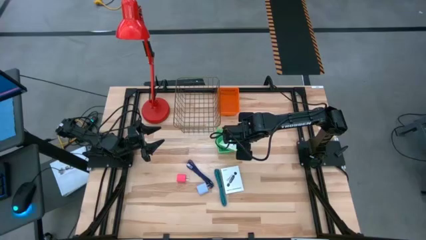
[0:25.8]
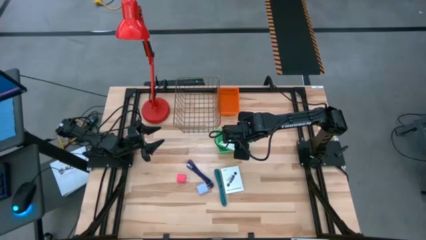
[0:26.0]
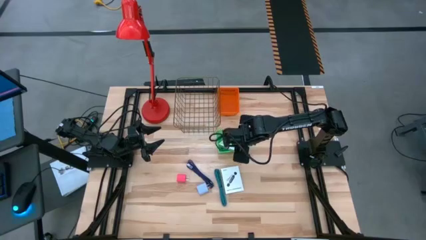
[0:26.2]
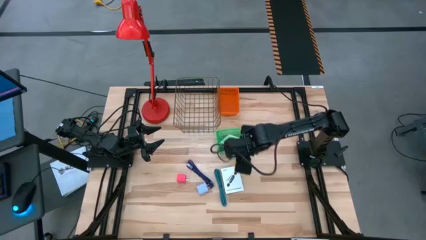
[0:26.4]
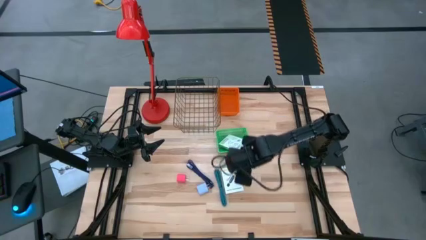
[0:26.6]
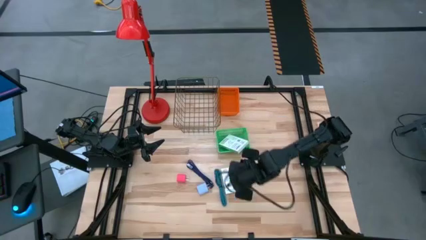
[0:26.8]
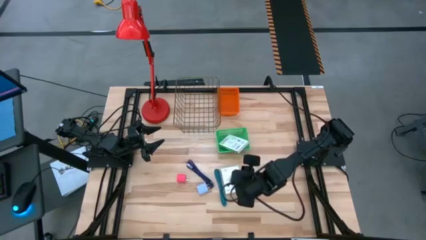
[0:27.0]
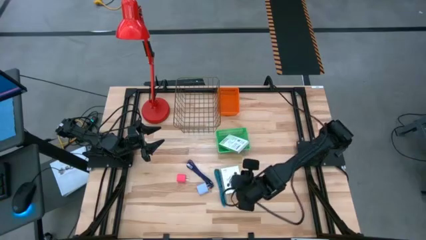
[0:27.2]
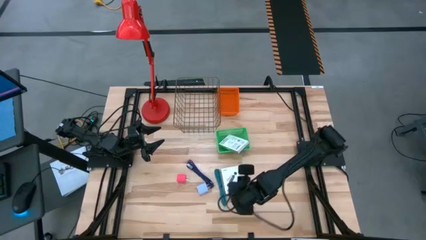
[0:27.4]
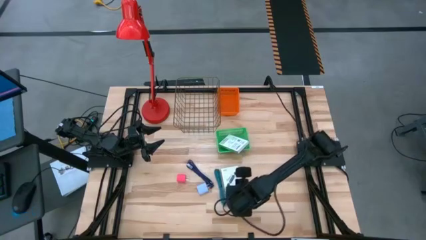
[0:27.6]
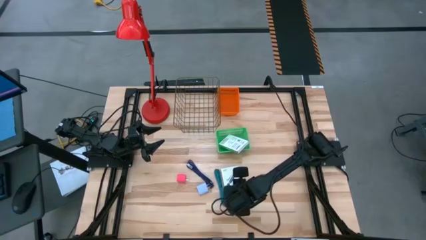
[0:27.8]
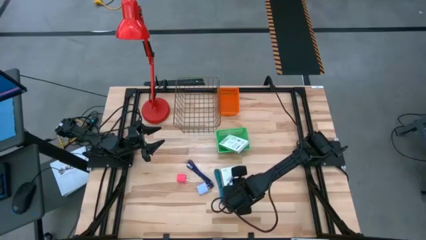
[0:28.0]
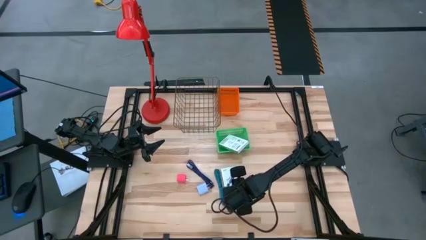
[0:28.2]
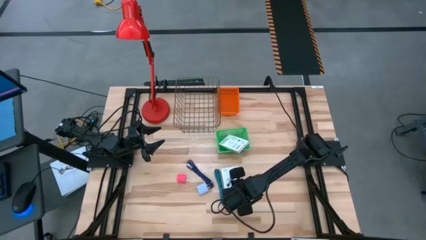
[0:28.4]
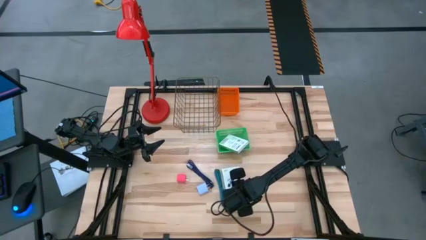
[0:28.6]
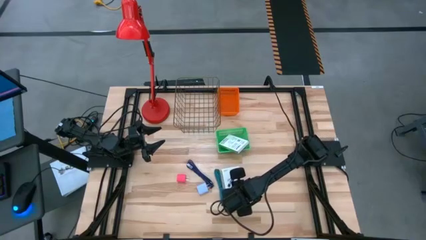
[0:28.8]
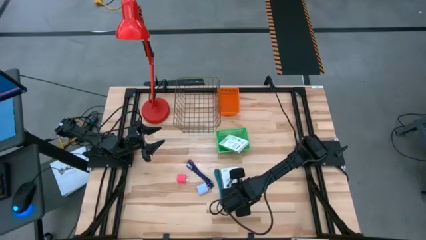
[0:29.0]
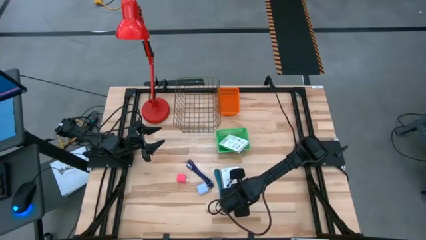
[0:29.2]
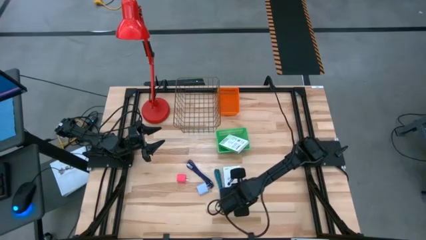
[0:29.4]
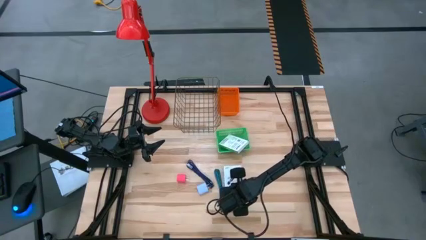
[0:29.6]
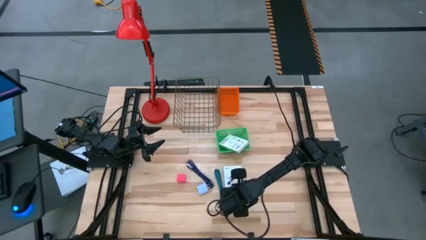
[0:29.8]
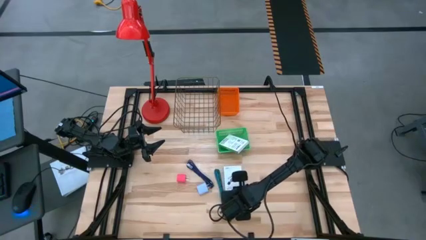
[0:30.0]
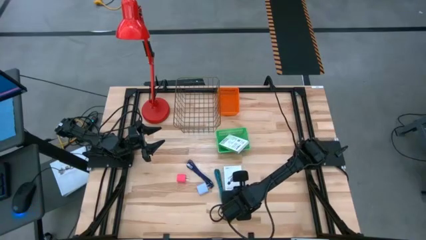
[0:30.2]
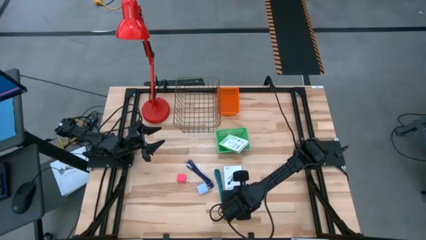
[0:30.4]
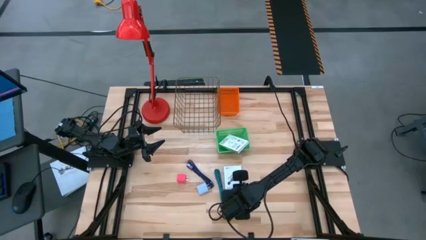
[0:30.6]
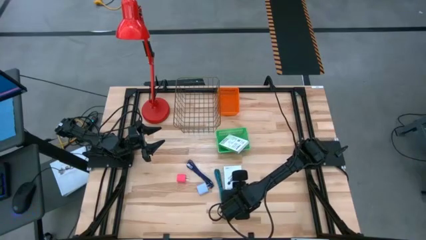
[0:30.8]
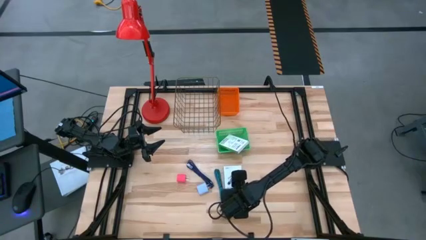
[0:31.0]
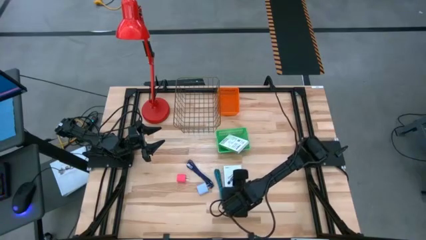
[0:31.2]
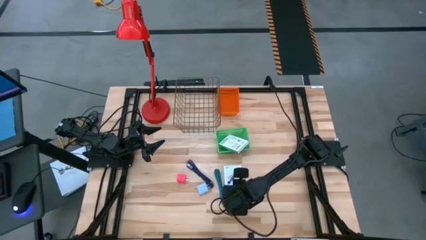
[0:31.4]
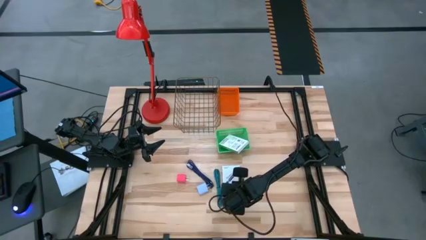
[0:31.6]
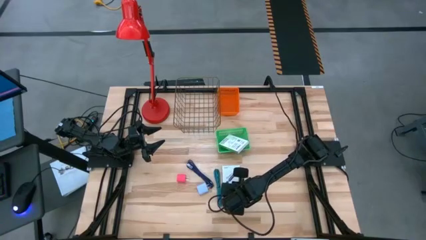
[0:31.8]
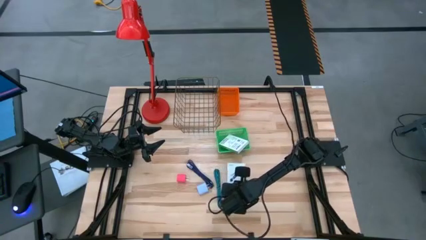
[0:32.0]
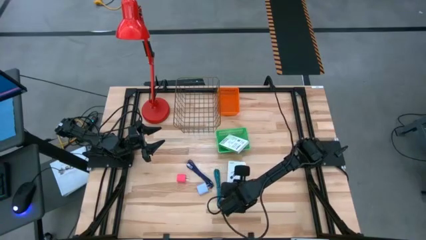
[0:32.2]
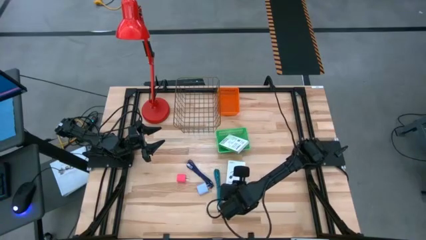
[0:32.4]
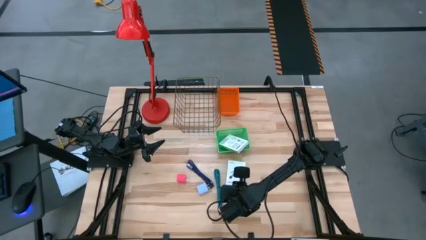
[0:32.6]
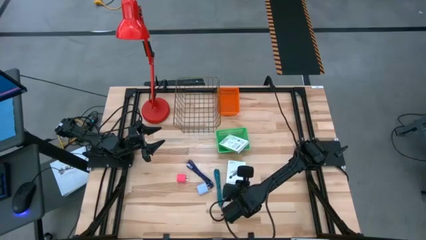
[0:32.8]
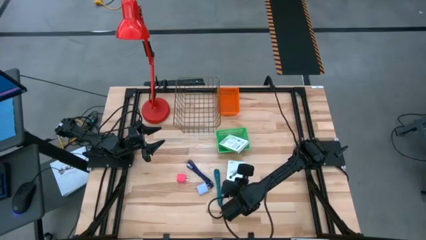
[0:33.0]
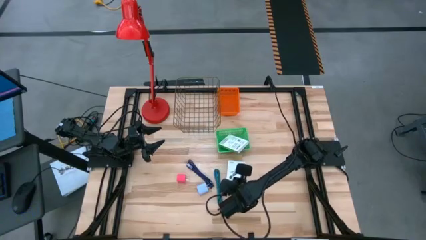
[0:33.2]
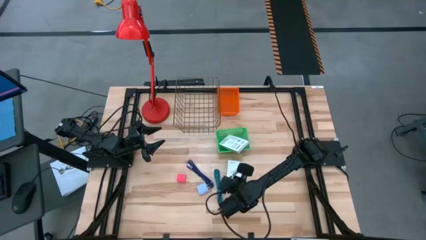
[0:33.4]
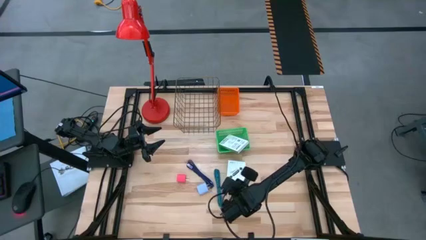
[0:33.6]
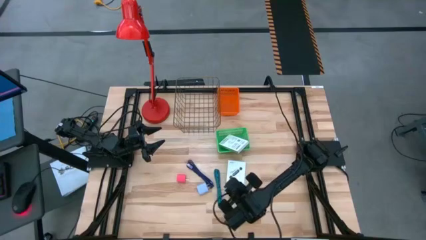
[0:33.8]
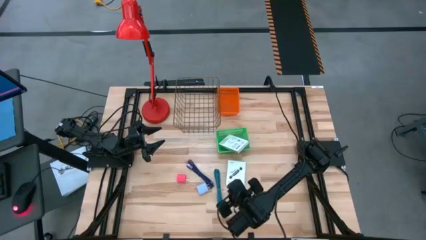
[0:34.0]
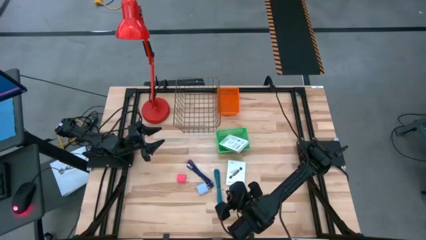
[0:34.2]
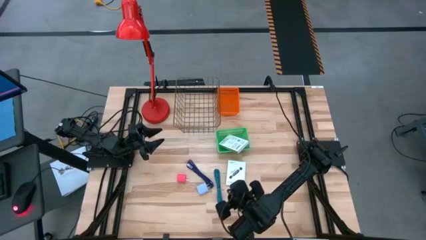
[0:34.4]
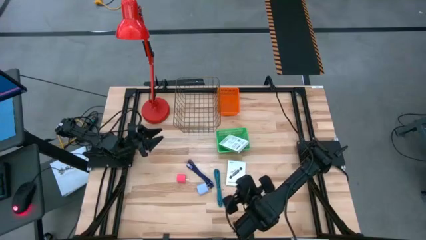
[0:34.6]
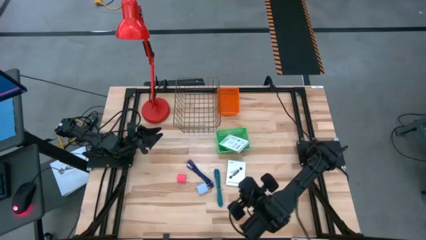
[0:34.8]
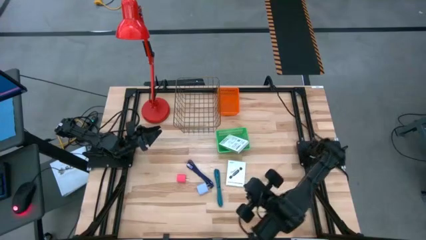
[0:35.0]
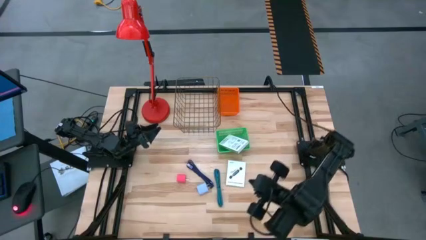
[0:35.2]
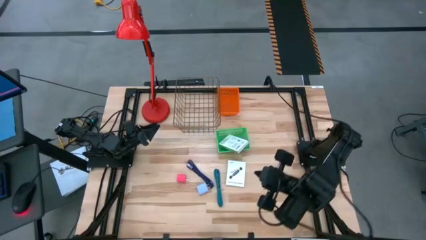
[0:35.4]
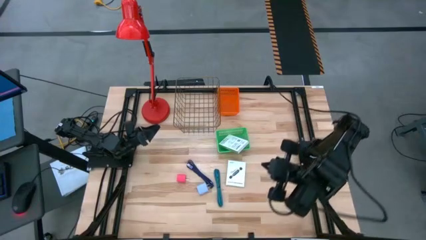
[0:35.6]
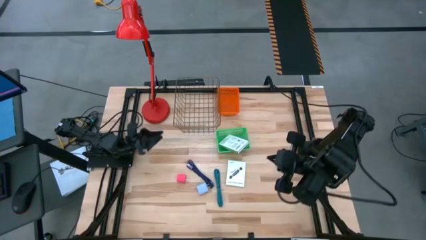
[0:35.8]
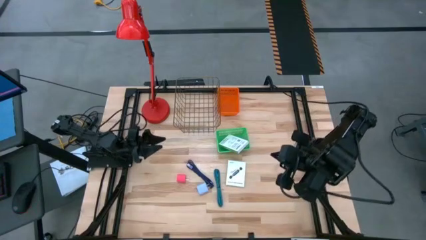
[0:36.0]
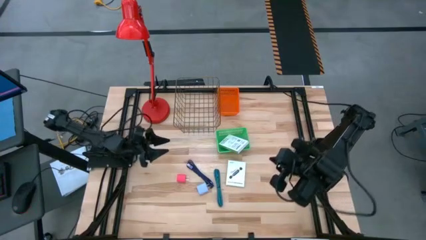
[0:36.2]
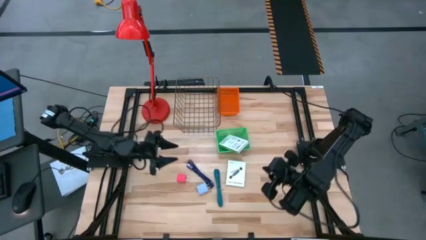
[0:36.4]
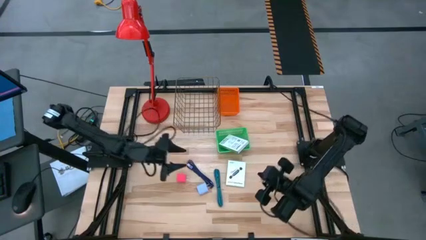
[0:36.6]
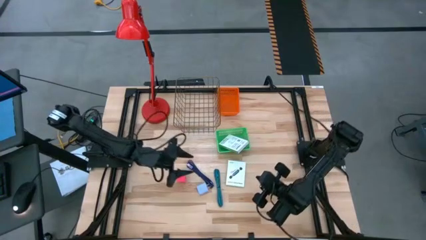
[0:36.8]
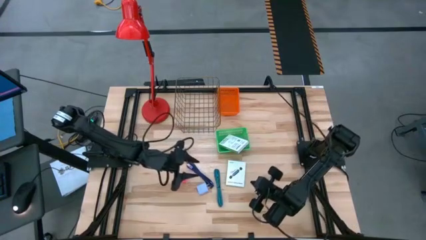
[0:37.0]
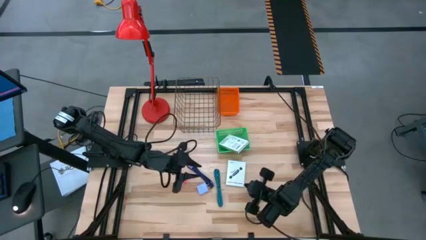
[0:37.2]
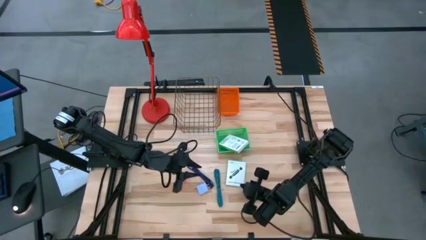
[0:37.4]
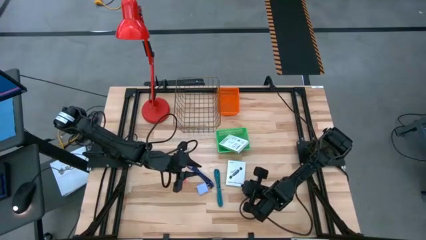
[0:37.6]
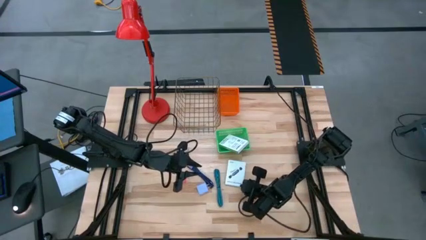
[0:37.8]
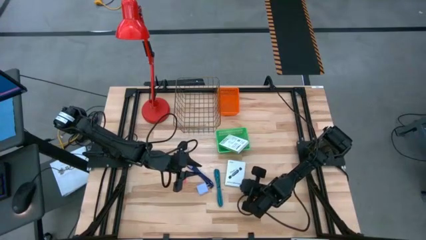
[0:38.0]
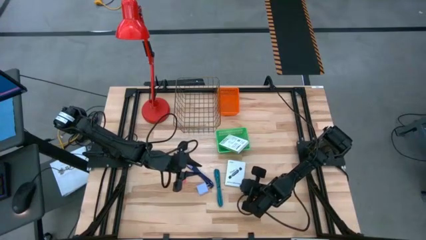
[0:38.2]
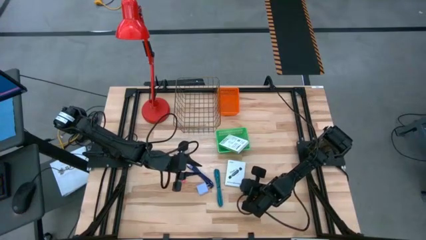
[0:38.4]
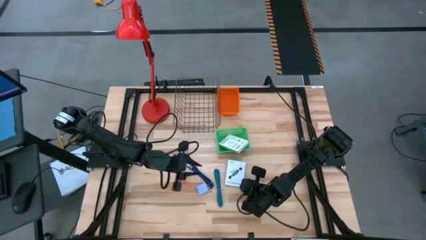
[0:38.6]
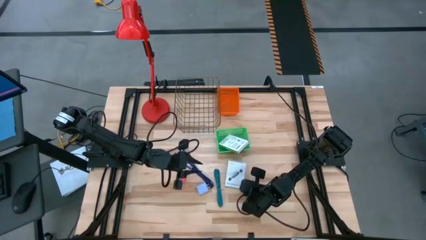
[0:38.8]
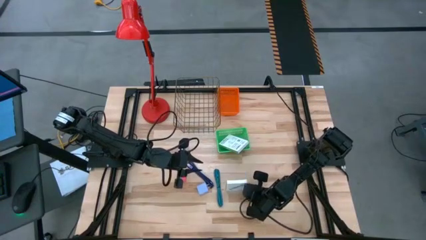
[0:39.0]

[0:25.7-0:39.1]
Task: Pick and place items into bin
Put the card reader box into the green bin

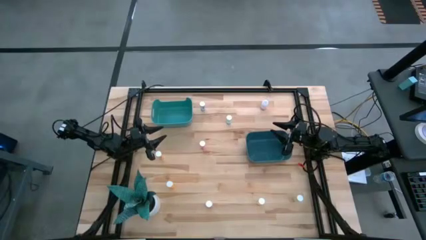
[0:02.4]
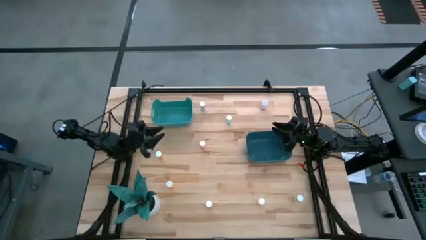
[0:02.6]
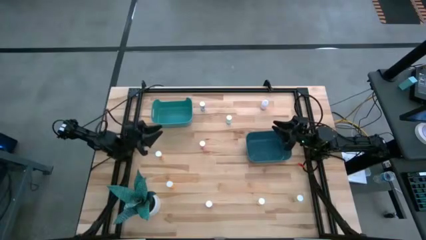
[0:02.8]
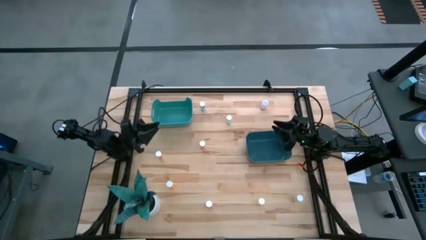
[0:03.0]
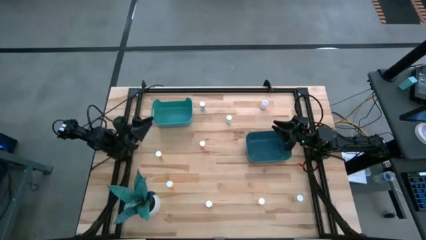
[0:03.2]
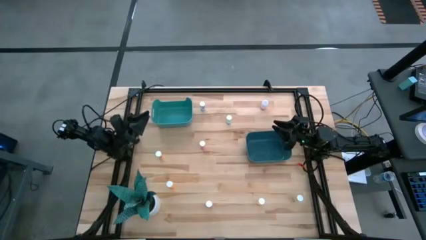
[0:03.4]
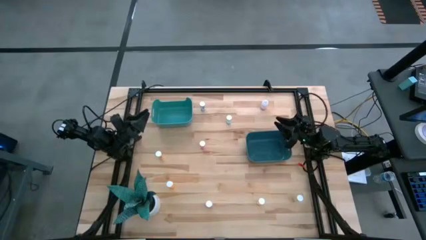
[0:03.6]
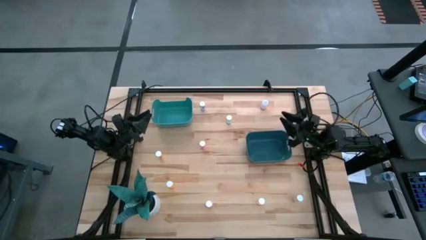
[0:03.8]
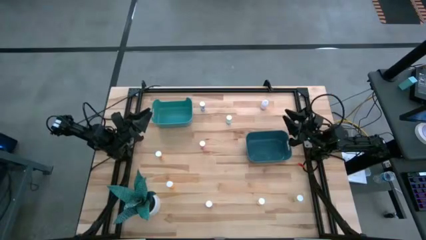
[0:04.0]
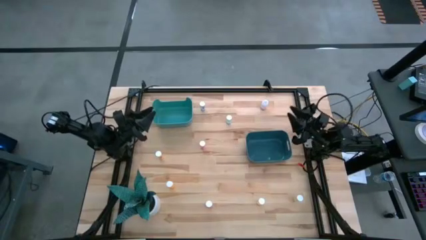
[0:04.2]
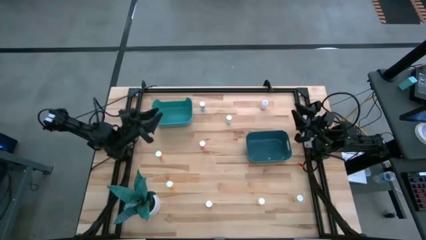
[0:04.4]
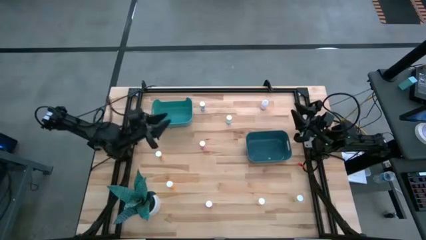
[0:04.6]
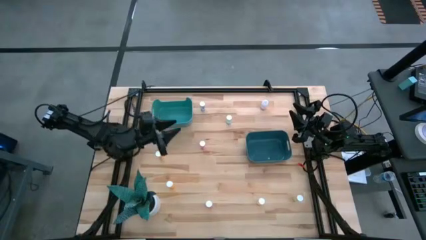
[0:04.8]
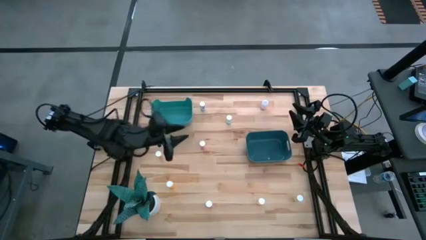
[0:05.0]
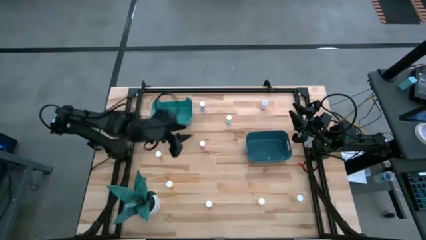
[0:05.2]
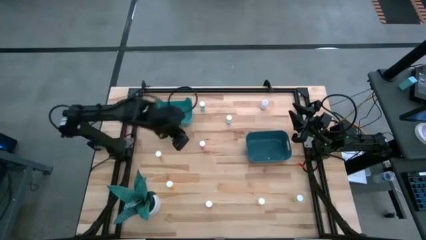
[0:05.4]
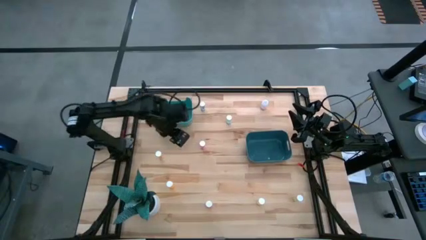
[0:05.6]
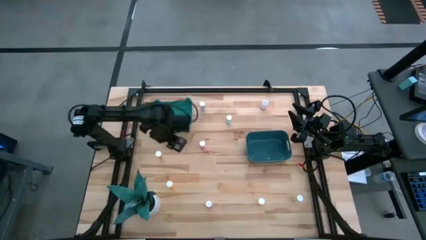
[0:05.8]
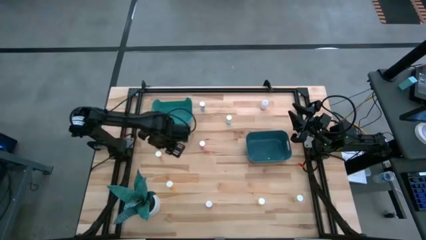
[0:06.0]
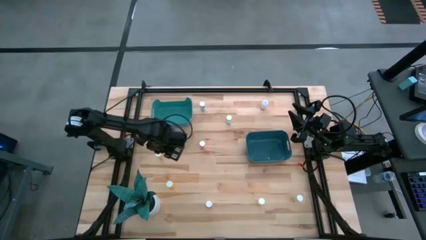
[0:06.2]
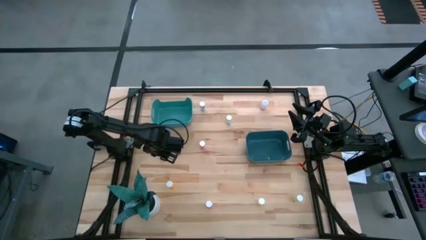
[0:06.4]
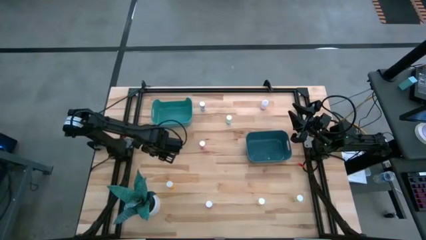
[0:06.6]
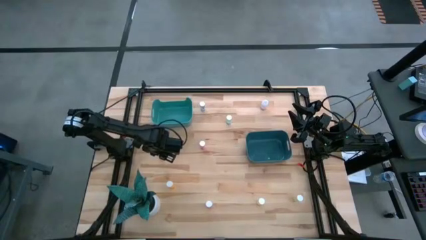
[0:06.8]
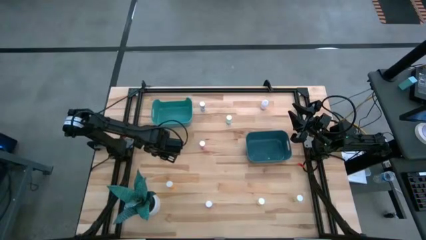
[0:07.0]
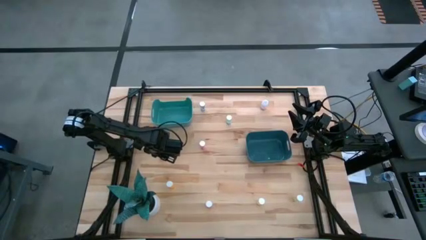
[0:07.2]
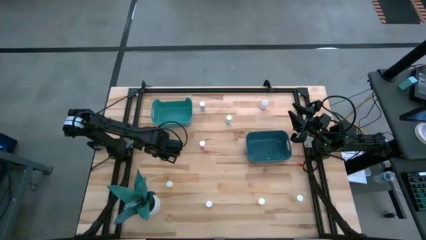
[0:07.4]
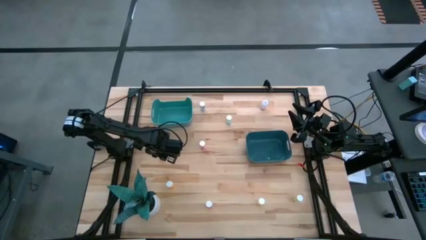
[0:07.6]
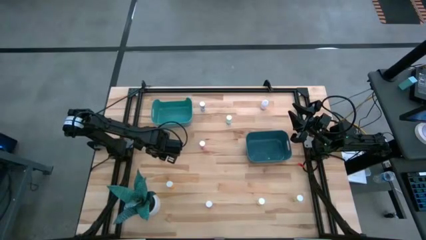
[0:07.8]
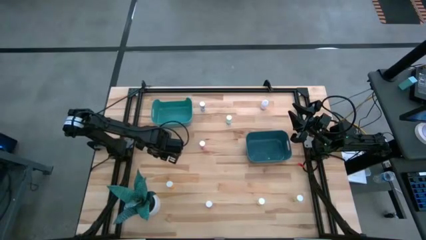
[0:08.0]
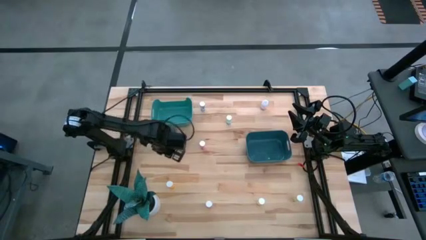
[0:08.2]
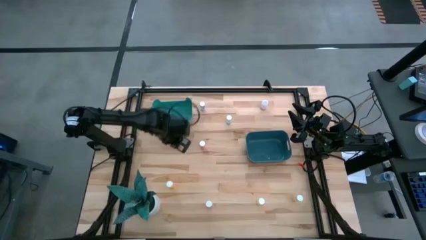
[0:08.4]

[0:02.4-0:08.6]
Task: Pick and place medicine bottles into bin by pill shape (circle, oval)
Put the yellow capsule bottle into the green bin
